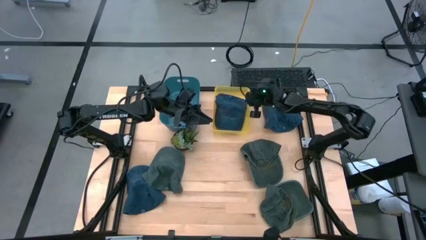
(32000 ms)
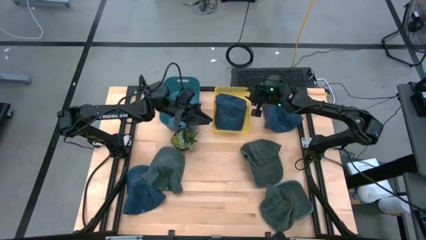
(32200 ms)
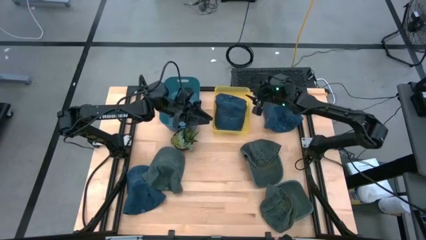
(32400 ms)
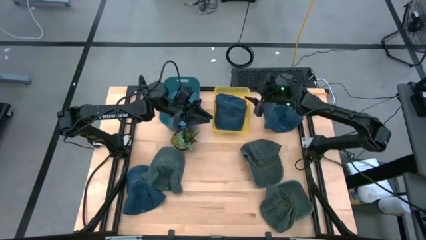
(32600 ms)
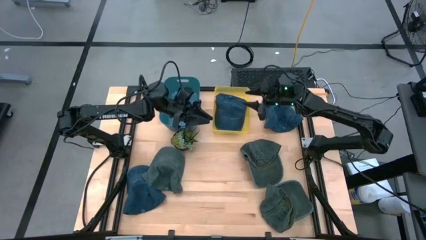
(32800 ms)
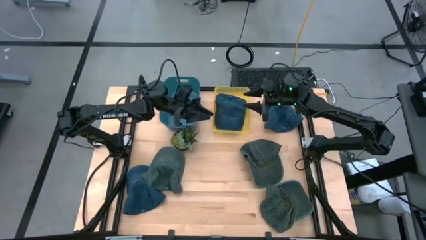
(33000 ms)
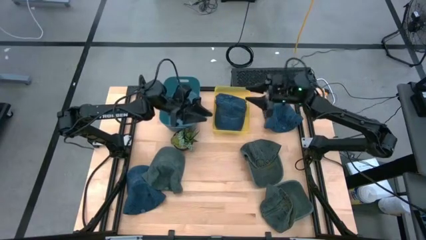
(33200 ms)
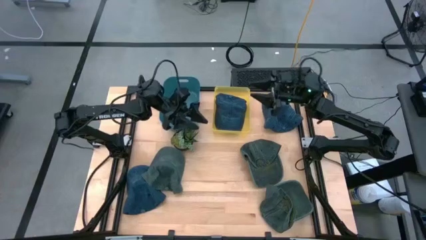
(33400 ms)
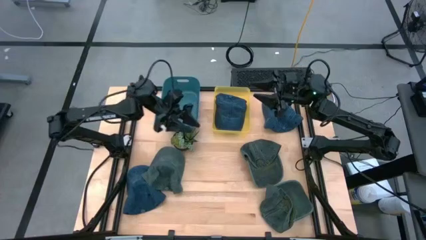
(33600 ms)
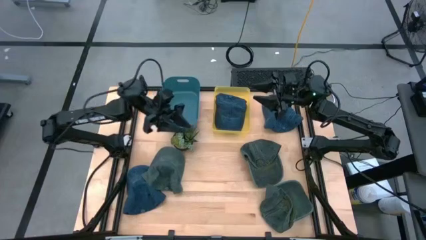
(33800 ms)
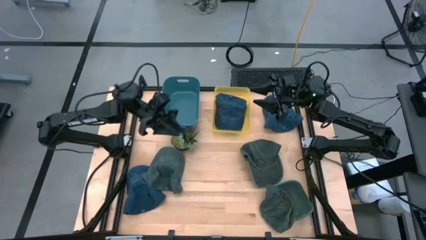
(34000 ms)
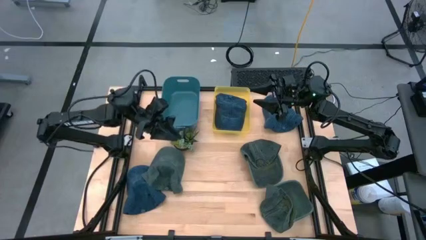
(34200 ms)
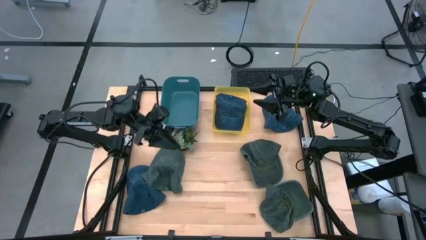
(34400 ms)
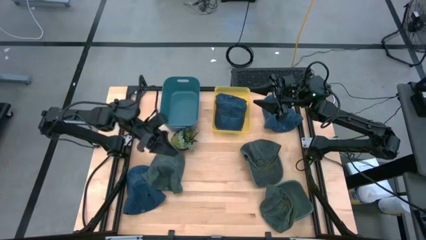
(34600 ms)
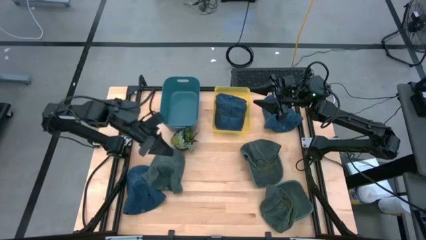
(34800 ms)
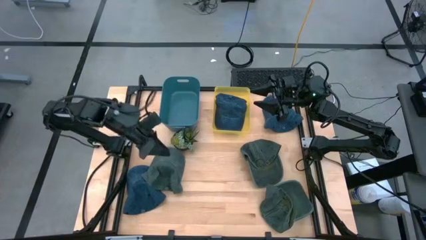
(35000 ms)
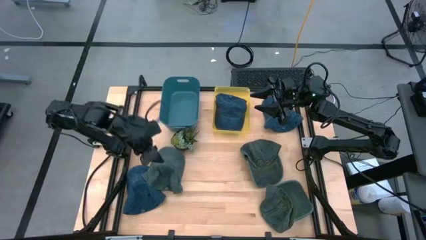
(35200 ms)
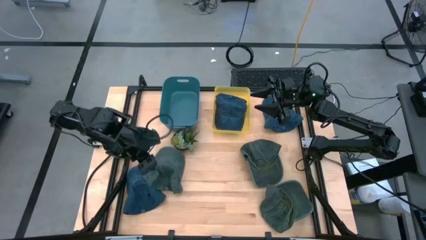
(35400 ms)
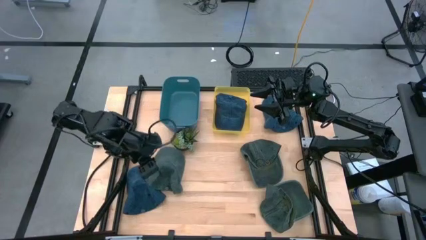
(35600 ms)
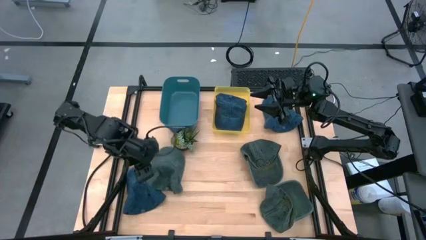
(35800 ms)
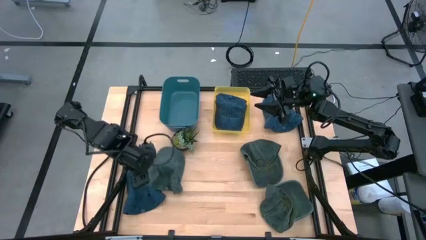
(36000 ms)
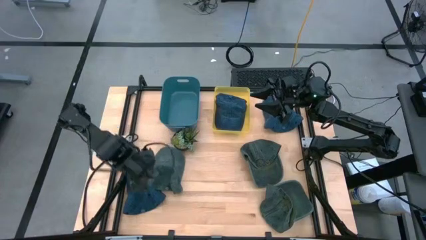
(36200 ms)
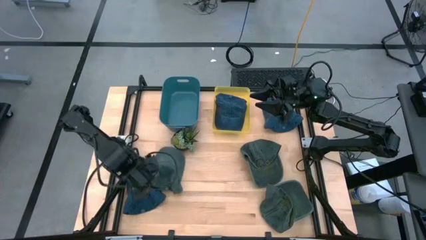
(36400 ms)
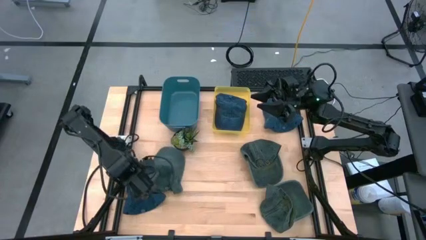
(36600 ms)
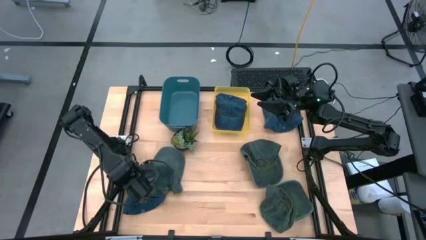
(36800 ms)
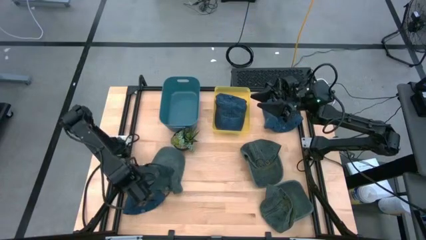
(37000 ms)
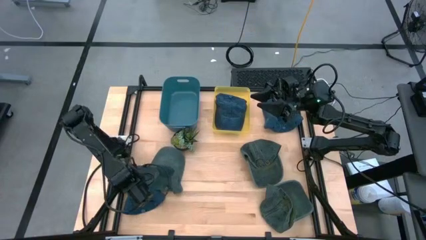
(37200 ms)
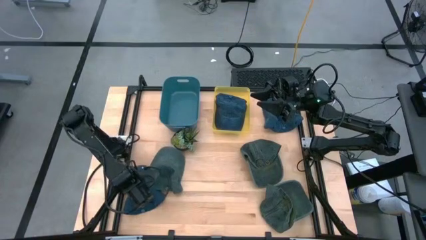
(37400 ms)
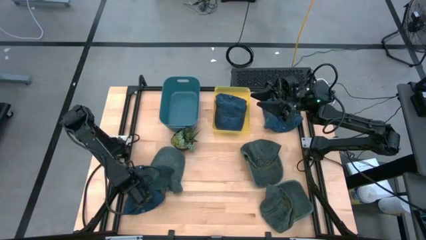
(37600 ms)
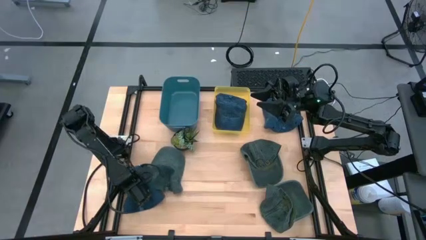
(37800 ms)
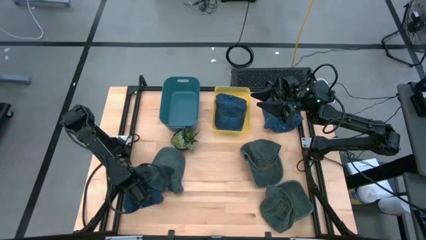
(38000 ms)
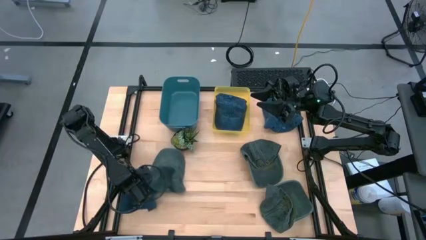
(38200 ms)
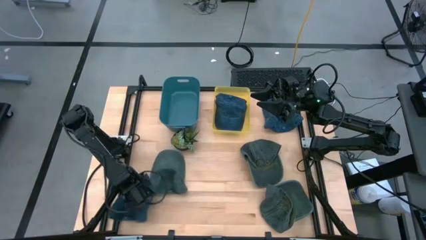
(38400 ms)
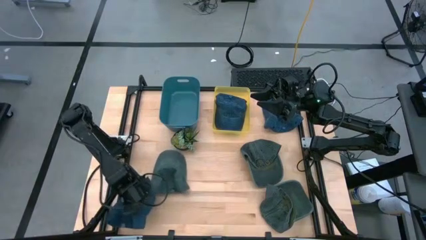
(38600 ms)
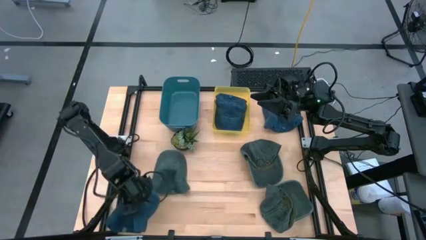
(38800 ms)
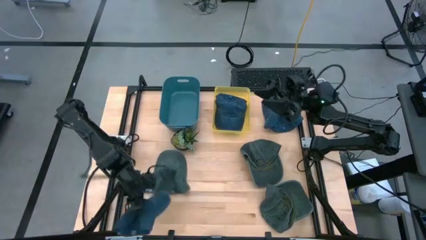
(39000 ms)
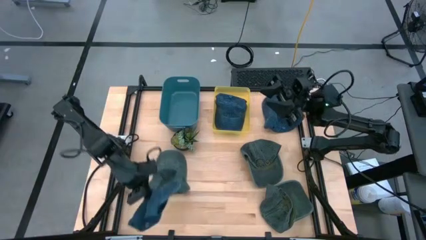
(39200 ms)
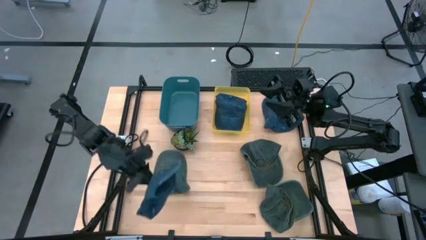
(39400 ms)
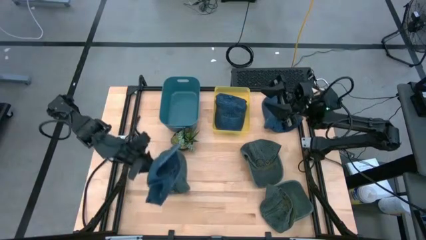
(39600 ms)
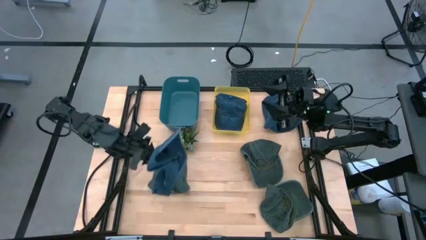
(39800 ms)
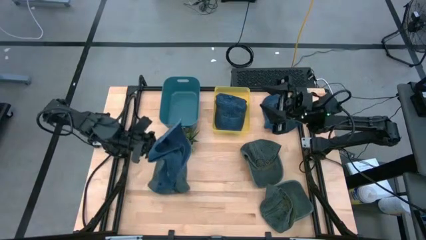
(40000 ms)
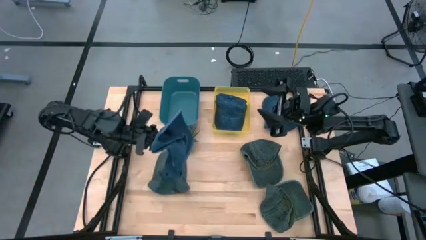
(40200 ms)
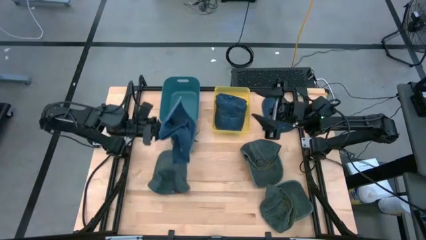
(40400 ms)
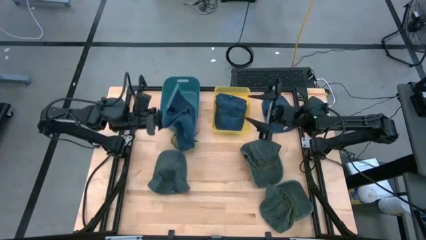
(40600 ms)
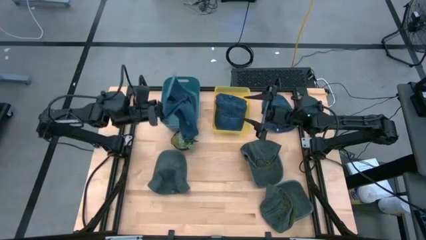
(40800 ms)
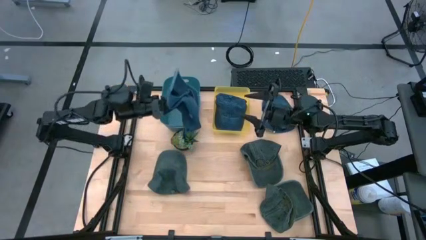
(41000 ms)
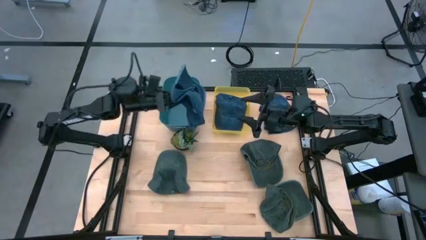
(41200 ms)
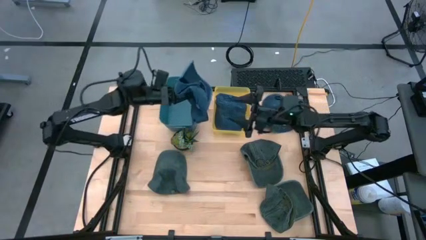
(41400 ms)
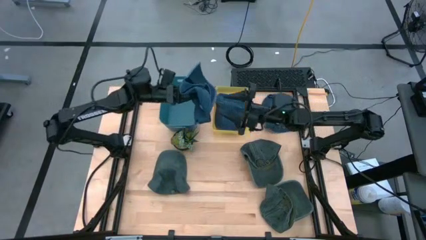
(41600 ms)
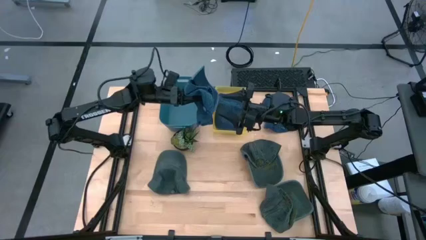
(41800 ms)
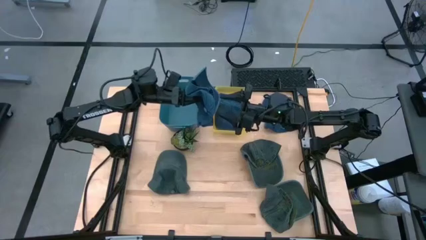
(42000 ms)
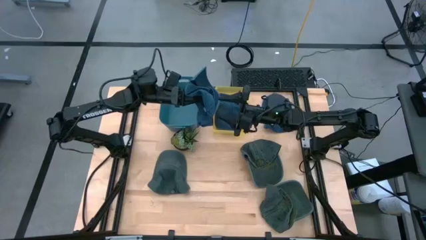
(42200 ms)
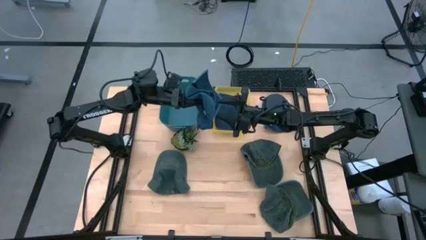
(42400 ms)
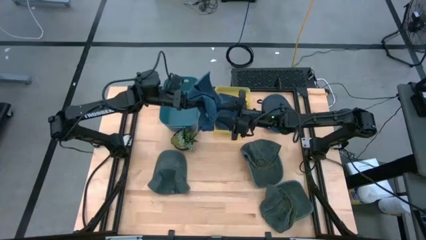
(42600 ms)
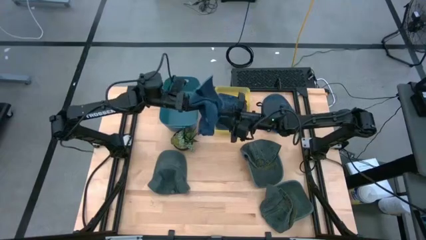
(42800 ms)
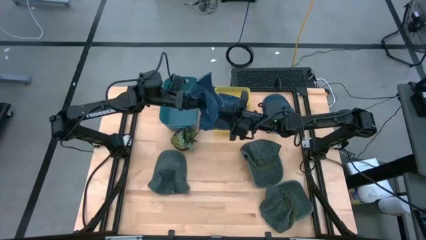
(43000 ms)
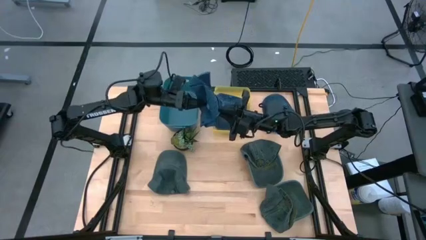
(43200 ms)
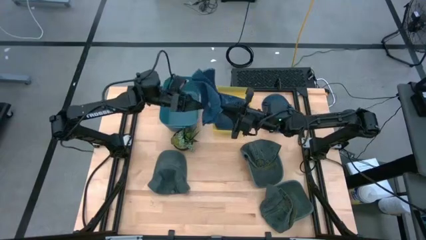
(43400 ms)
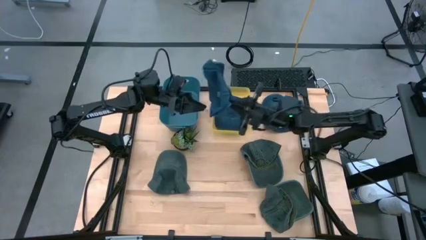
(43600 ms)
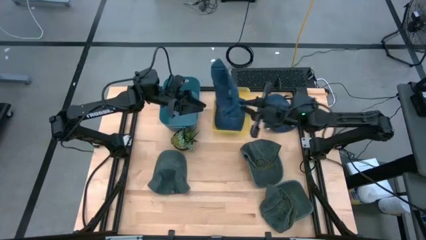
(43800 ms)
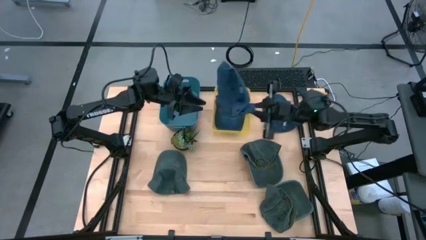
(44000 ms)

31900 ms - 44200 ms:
Task: Pick & Place hat
Put the bottom blue cap into the yellow bin
